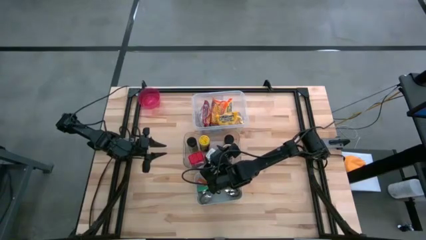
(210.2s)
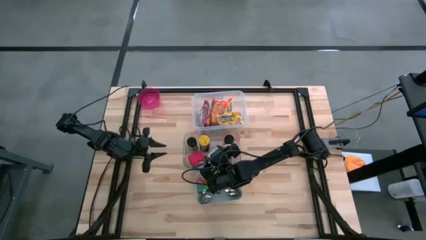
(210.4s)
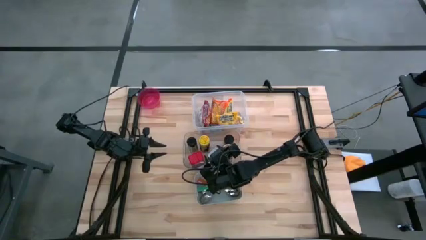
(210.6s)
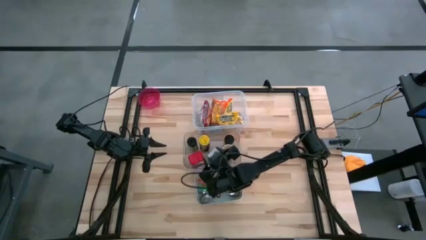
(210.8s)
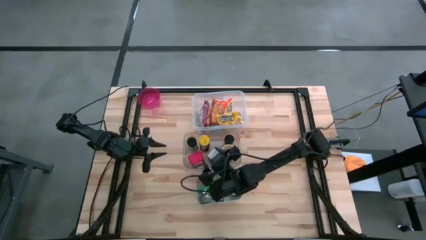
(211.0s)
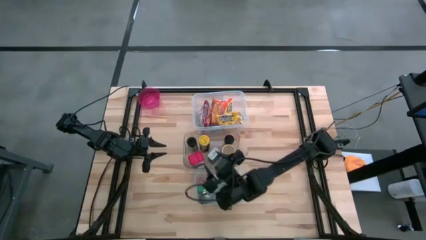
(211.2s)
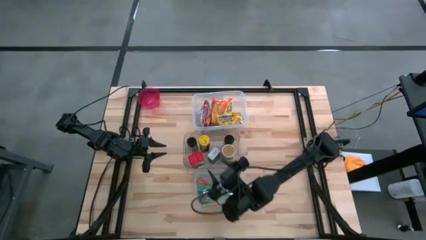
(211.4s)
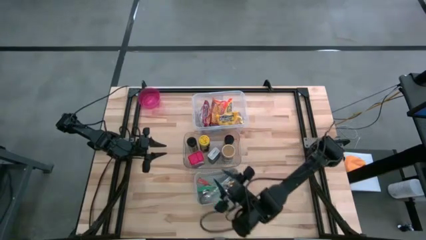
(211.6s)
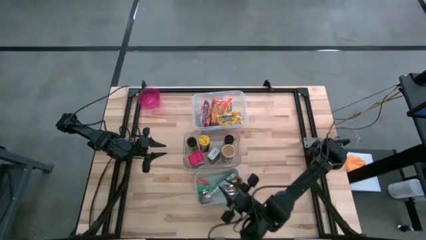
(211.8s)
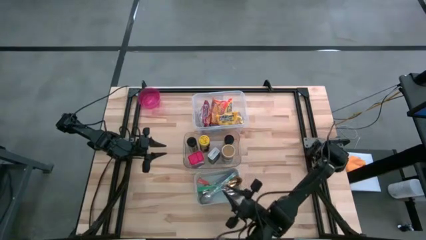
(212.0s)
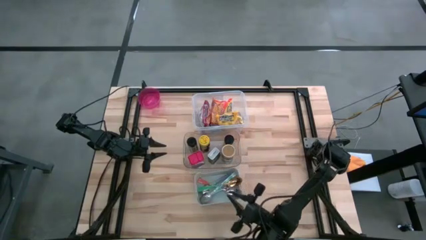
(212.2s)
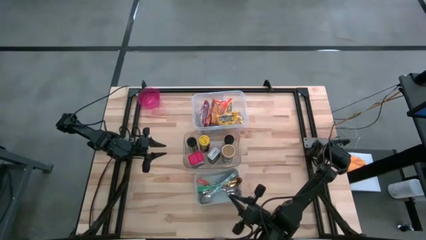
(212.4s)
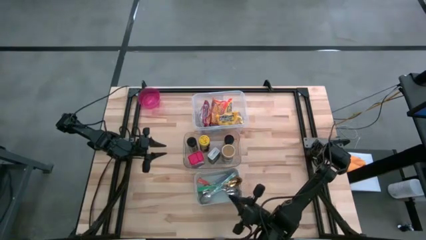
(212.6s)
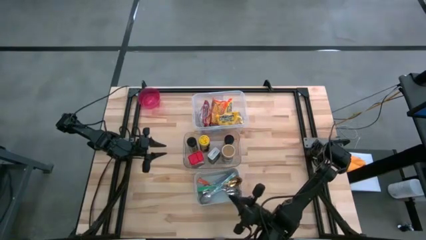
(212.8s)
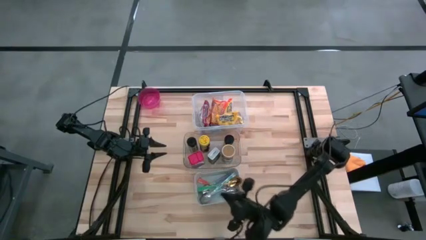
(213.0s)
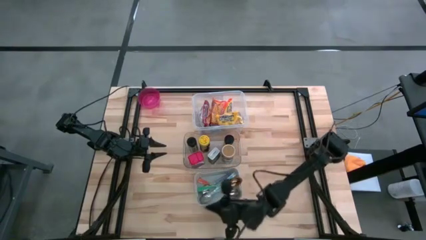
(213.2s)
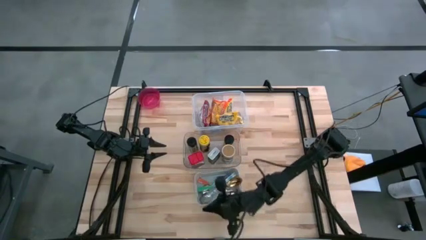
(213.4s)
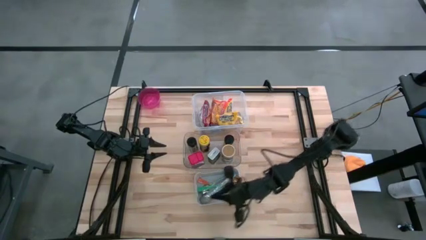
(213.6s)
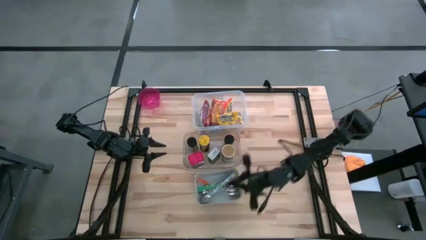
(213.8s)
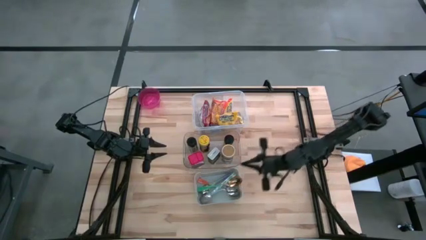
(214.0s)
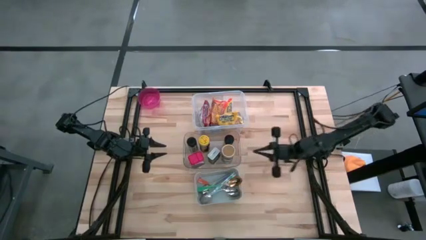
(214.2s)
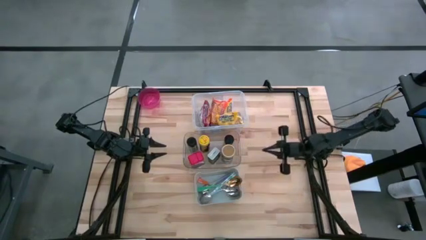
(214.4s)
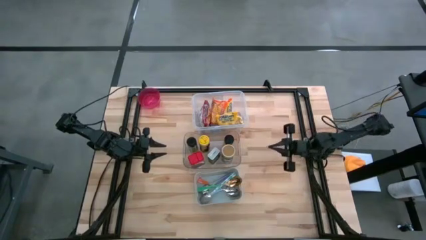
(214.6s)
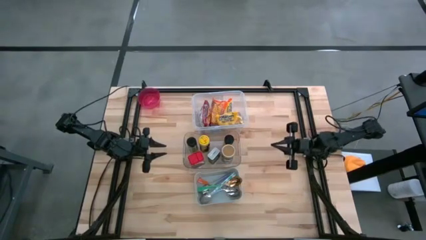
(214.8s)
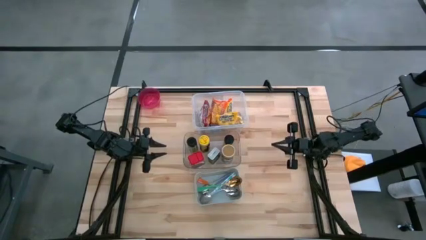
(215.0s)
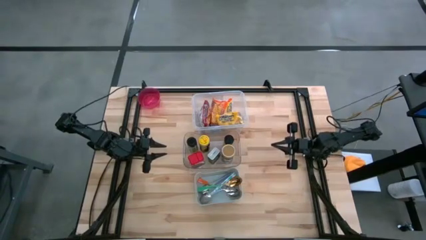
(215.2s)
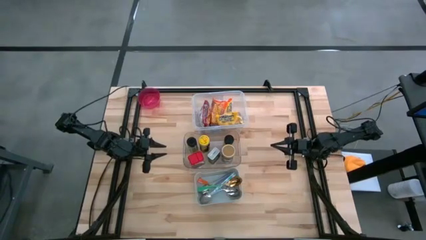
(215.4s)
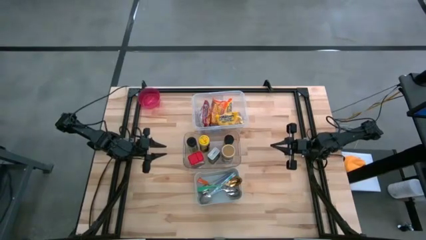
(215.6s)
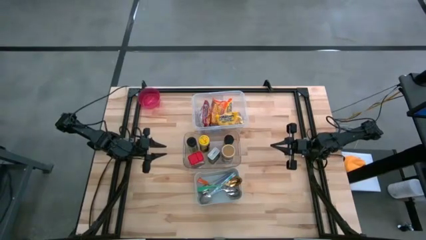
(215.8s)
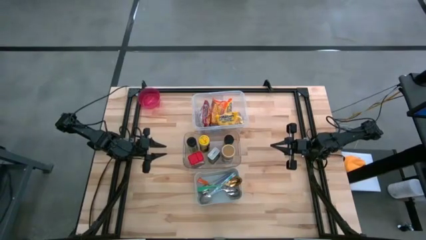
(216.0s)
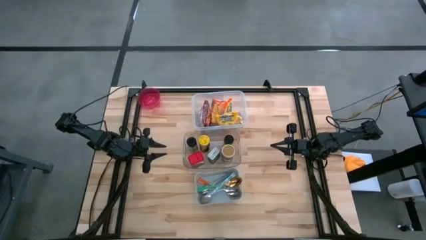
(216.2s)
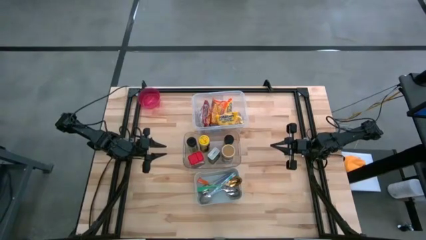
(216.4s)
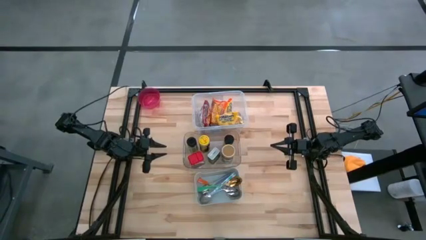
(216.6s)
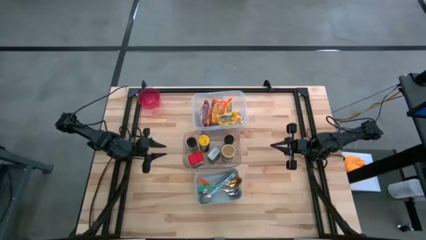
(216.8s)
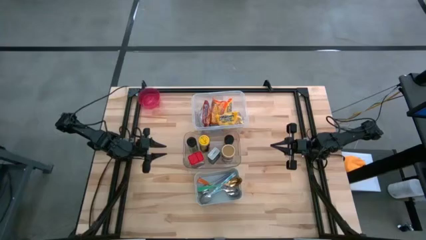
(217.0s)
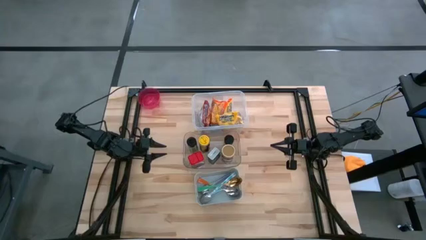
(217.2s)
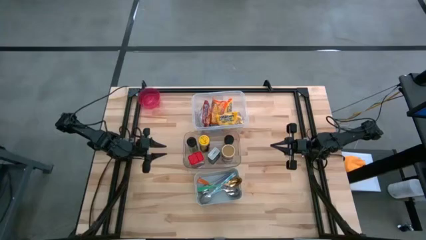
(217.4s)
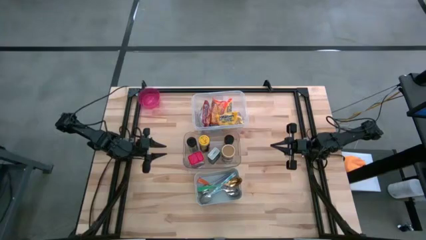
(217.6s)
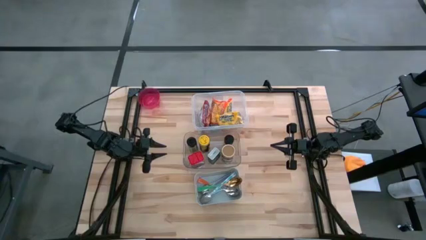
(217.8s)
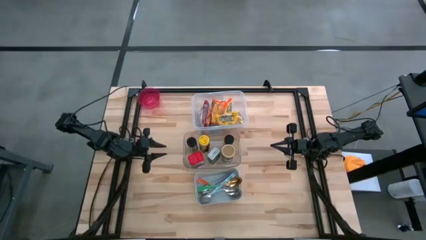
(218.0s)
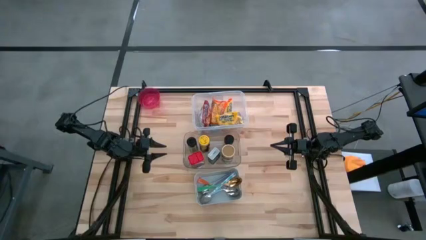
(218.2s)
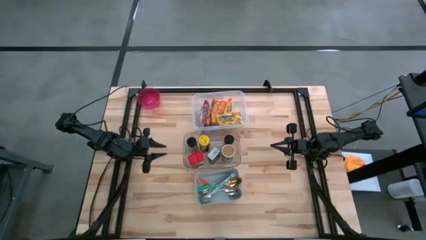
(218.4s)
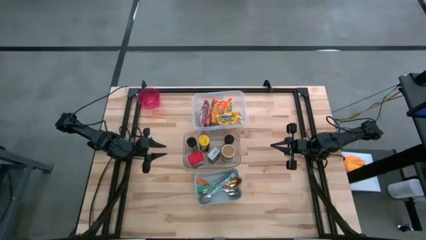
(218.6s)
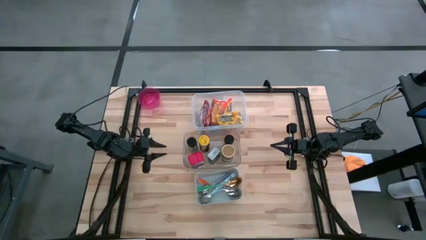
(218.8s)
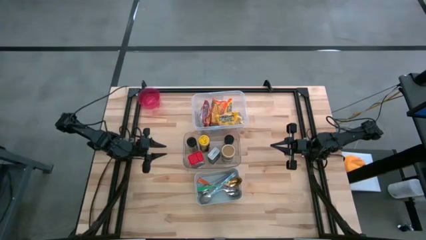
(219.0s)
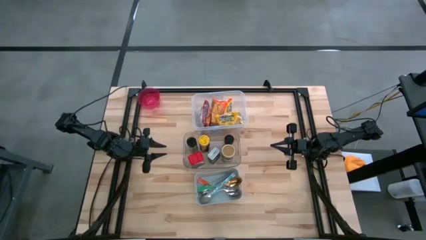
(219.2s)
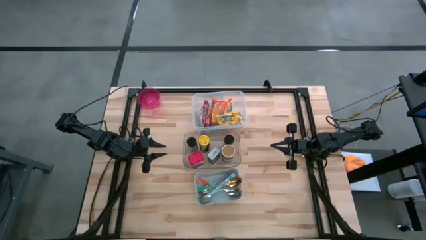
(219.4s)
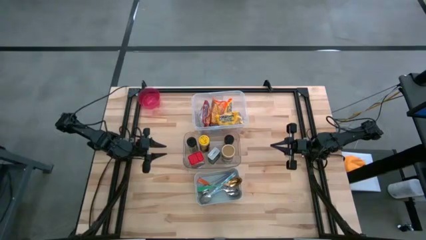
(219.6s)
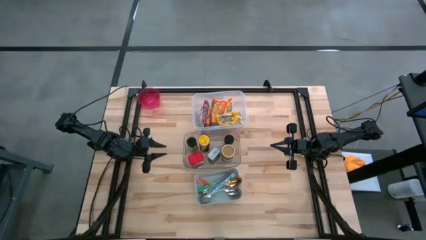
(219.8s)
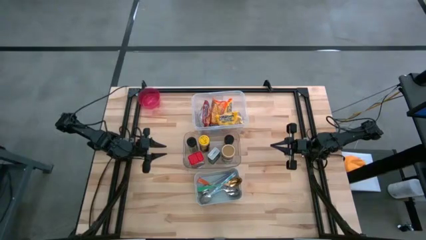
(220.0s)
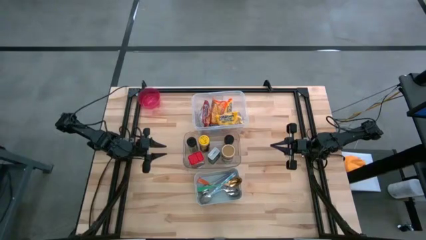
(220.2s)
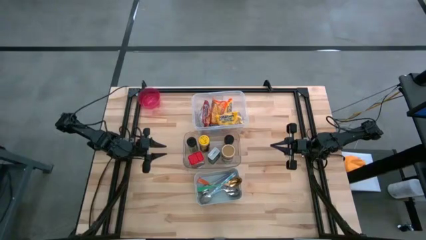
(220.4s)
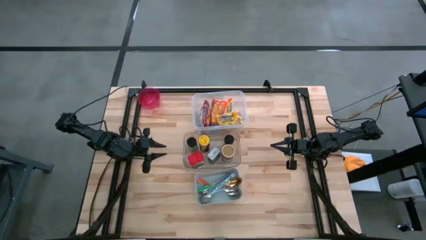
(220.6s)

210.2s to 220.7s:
Return to Home Position
